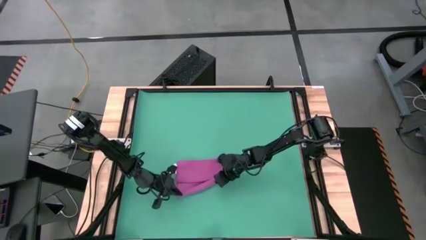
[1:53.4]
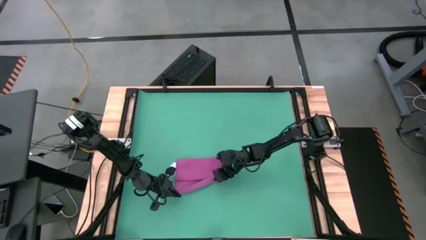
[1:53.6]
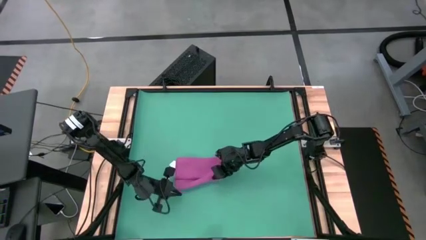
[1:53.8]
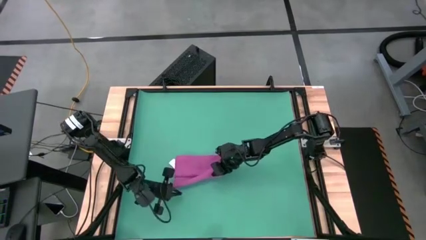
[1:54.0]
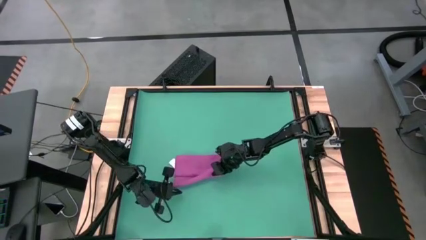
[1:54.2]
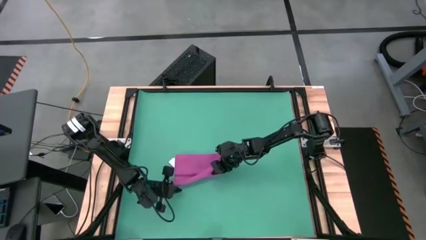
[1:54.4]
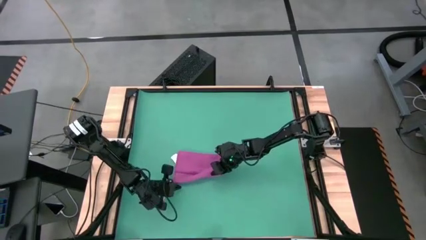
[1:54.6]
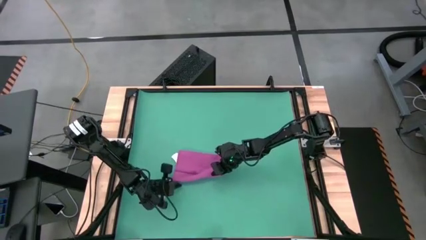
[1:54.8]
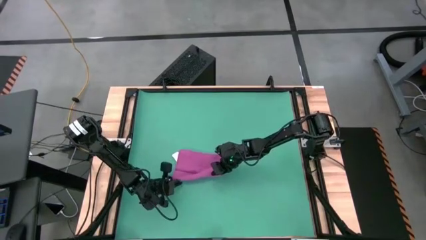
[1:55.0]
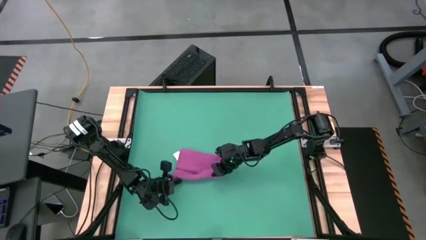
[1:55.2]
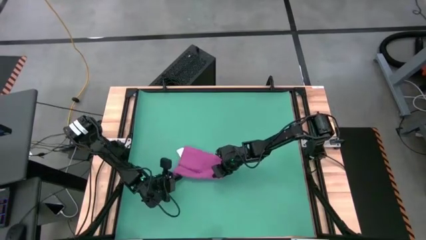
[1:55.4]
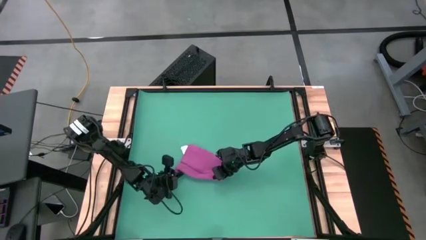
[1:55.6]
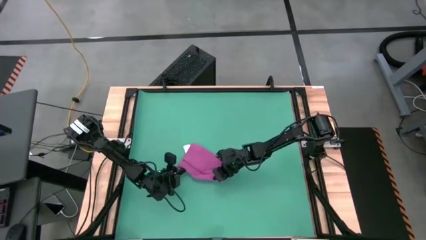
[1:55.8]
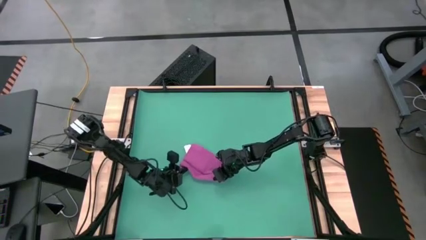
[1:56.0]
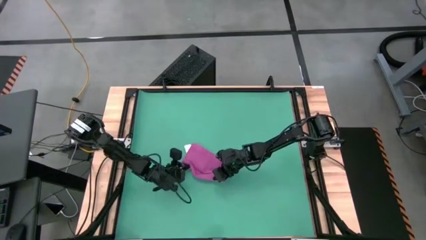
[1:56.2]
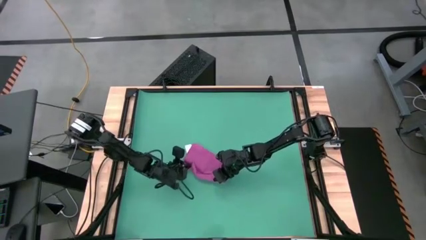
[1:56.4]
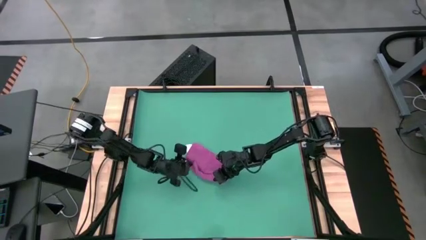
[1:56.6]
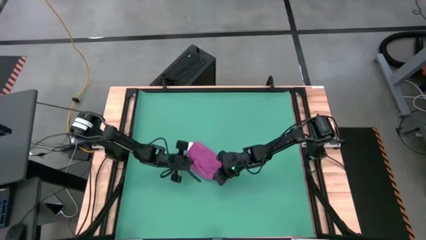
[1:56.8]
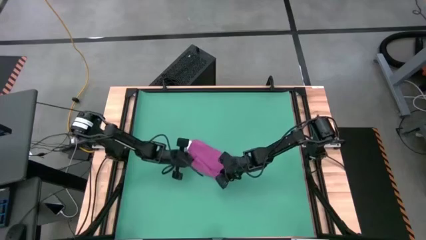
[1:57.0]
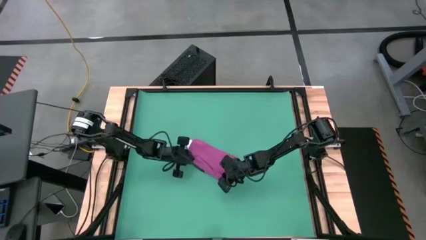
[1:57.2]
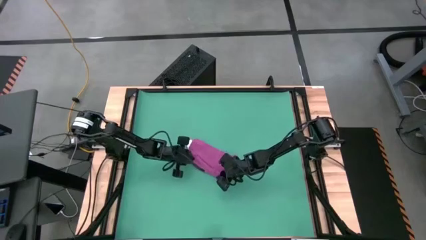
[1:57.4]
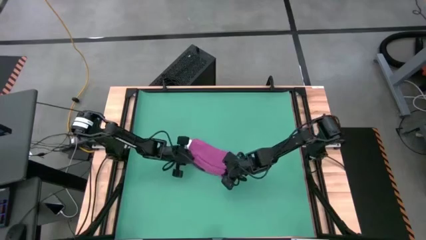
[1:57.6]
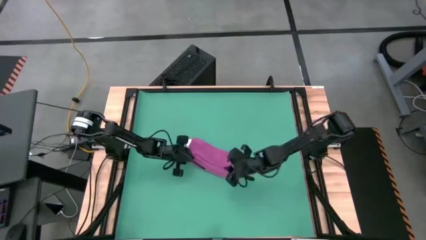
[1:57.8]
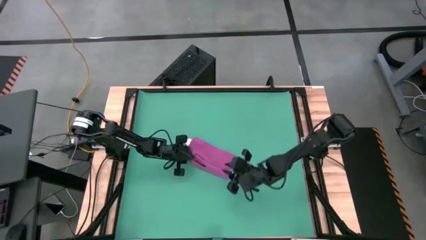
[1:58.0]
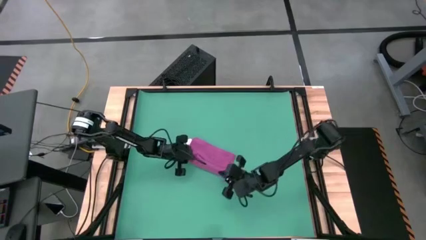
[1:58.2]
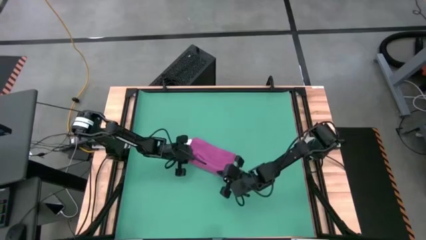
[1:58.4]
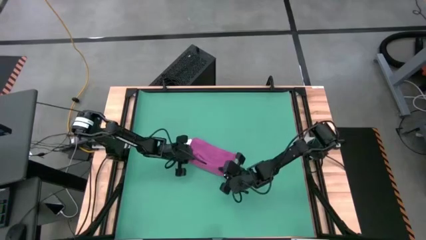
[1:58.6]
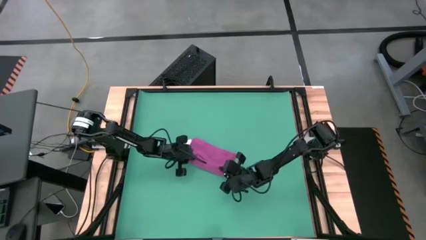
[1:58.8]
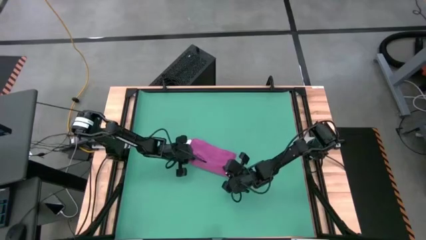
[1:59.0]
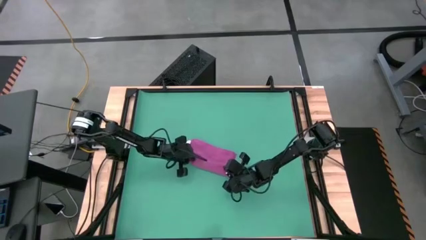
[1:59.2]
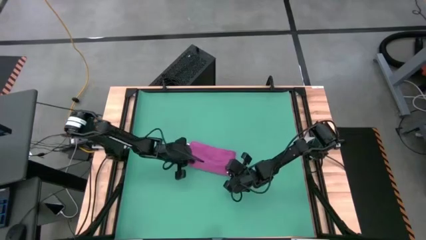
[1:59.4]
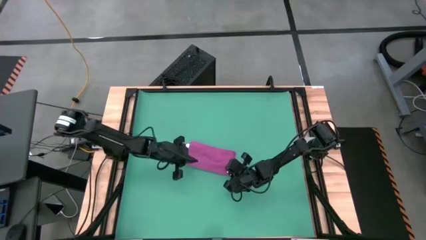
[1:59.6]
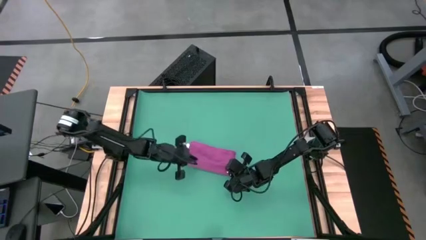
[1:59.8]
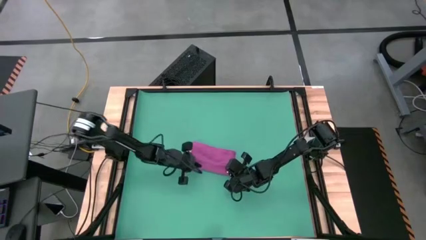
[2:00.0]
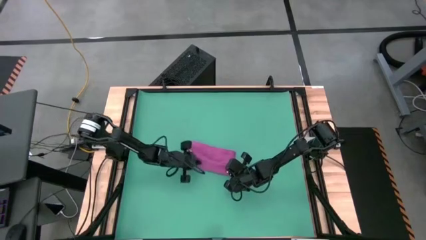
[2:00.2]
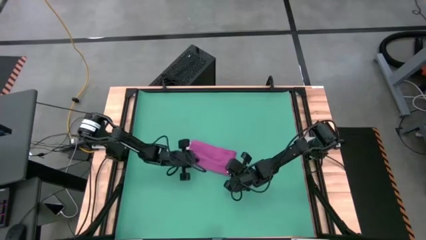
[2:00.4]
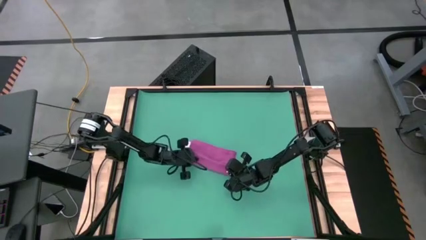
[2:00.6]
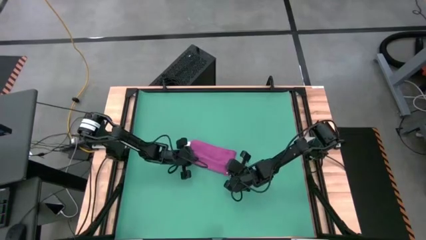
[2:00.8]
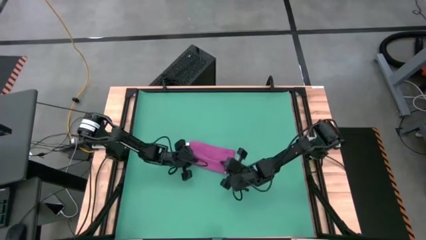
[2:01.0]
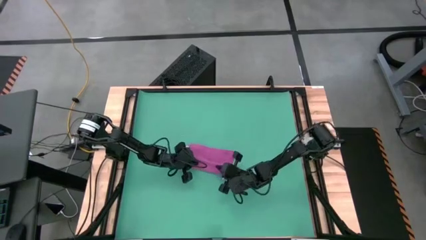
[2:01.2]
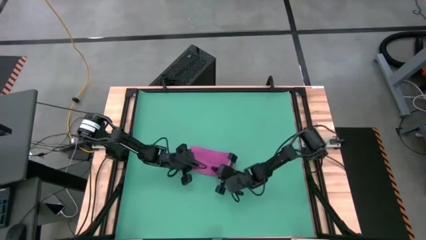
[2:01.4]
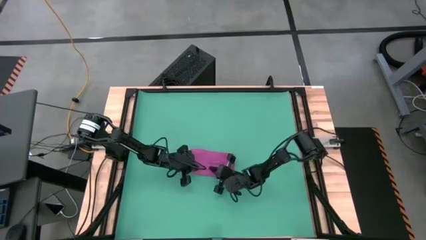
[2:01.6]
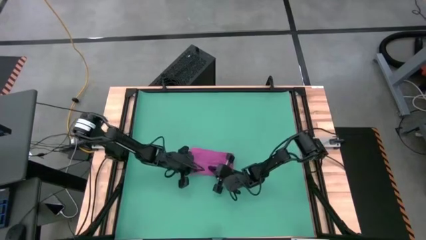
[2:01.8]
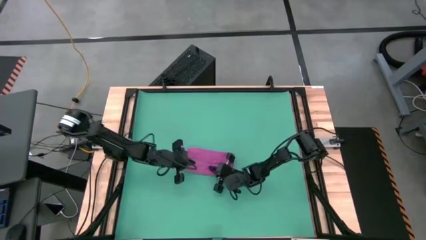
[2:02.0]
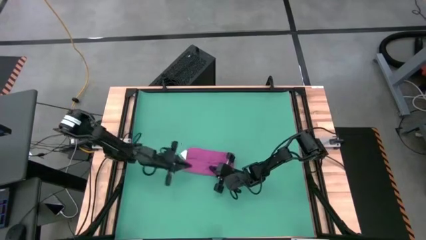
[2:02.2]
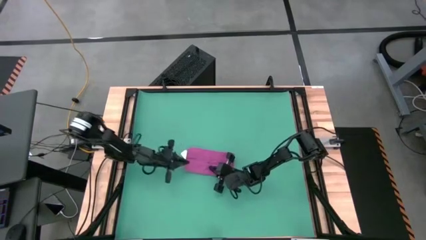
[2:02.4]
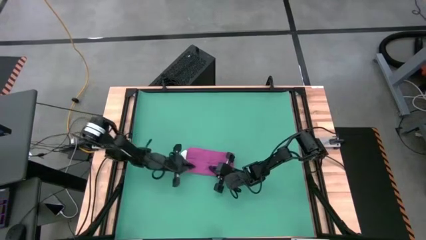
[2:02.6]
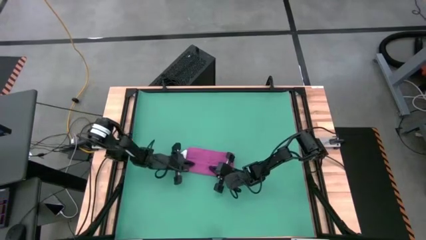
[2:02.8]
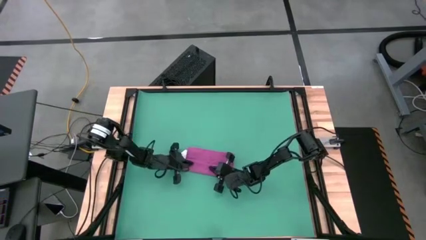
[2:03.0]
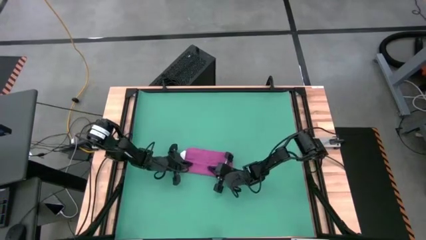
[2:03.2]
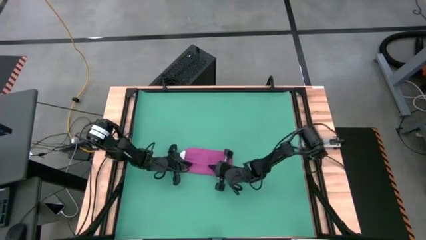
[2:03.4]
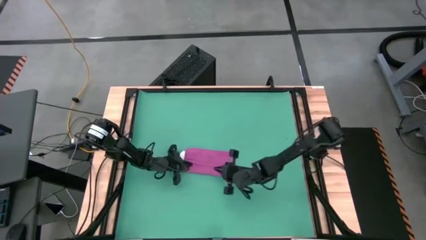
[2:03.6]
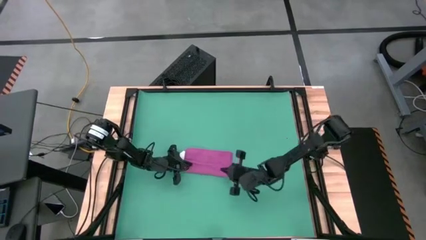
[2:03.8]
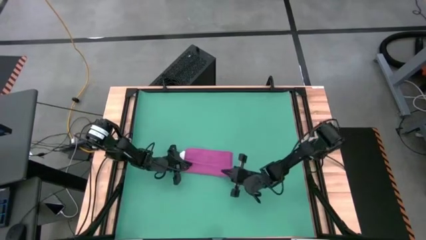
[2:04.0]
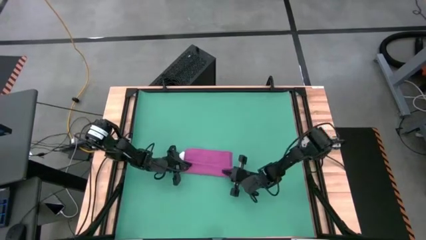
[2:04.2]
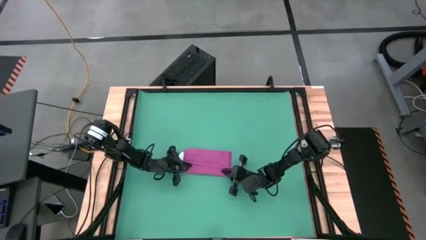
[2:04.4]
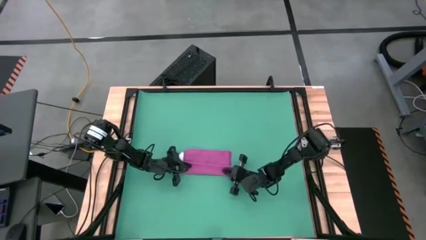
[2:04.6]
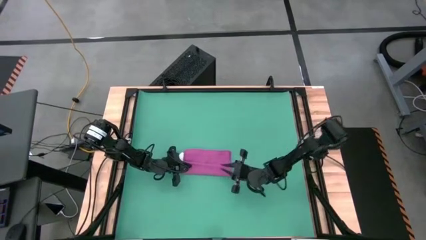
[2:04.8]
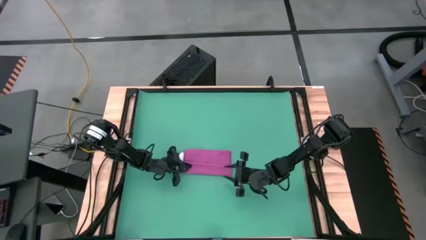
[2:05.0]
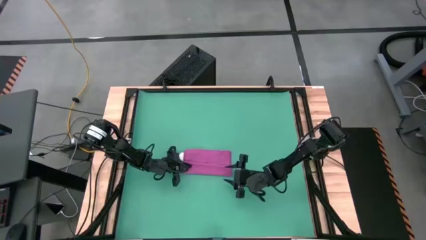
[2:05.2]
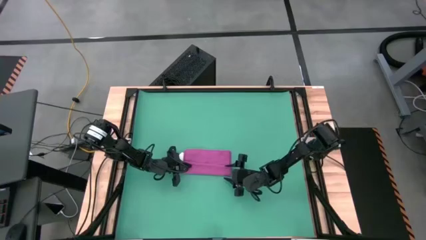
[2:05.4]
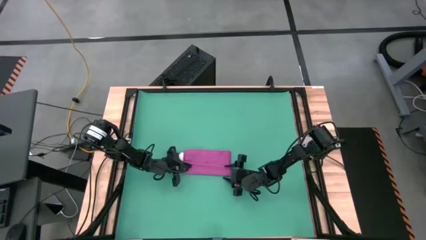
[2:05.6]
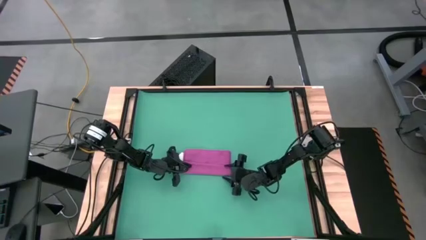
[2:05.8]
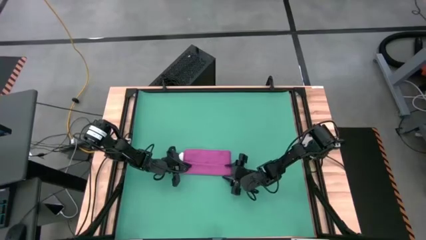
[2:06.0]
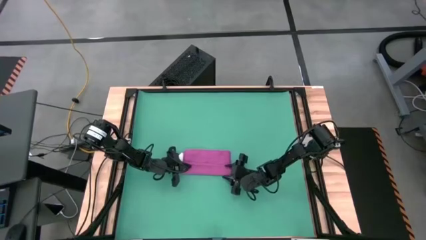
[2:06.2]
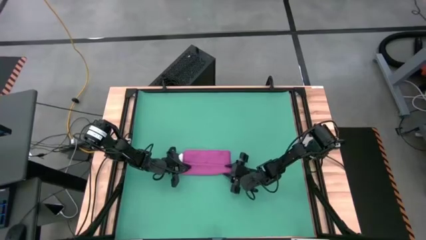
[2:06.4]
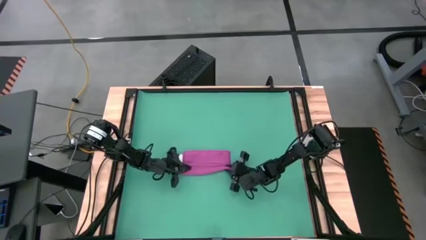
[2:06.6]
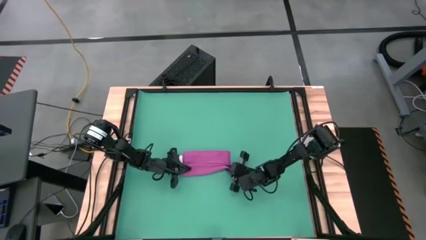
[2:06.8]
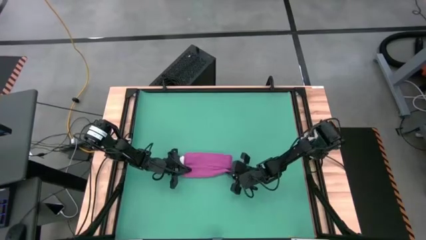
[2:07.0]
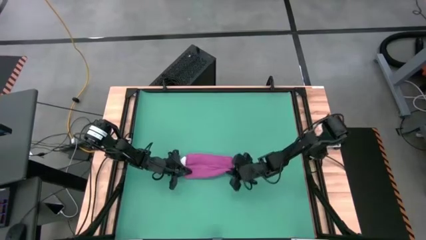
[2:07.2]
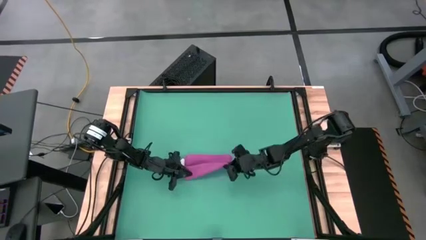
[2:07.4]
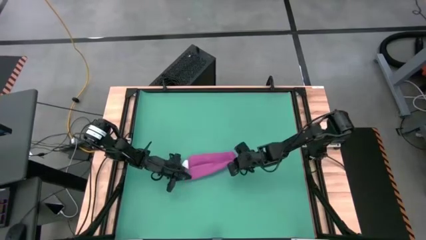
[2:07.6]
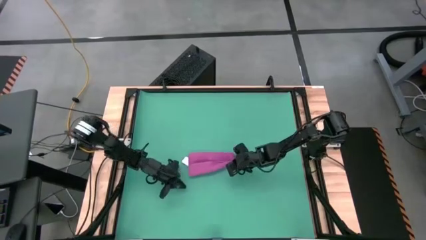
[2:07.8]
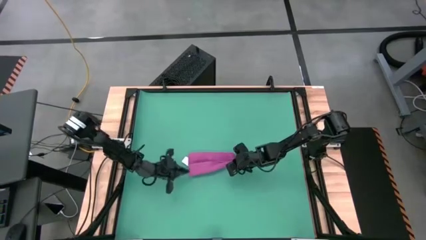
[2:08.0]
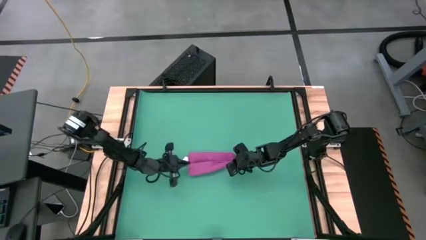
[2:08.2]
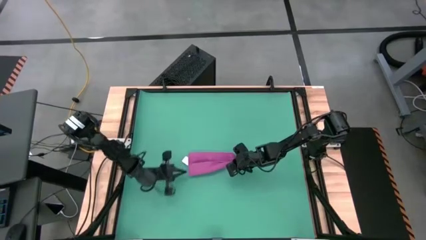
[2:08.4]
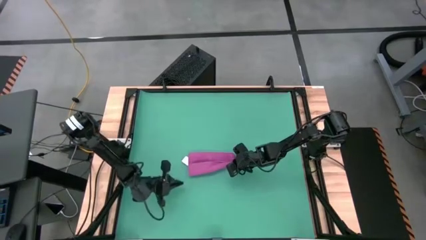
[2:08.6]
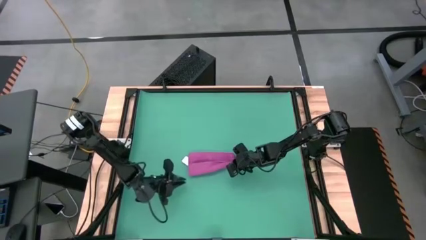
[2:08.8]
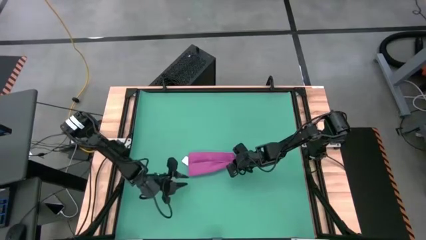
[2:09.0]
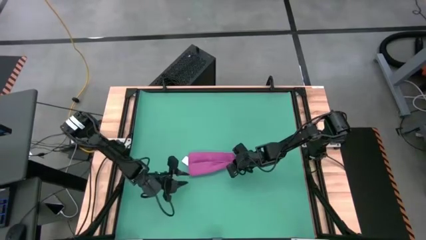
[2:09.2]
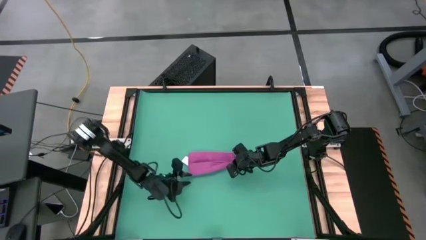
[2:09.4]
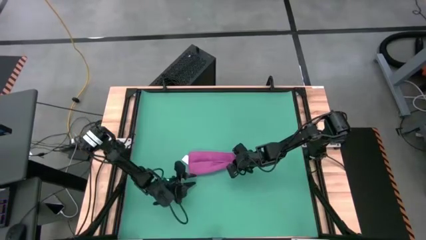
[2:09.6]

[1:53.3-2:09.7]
Task: Roll towel
Roll the pink towel
